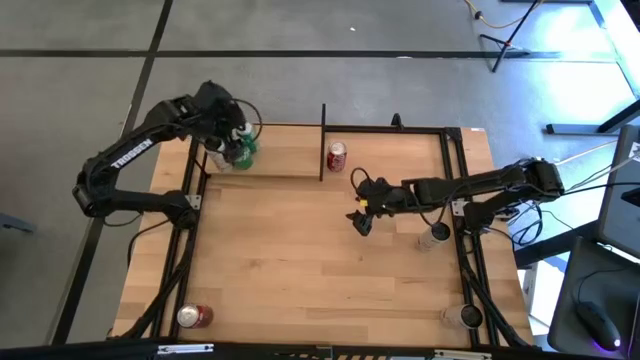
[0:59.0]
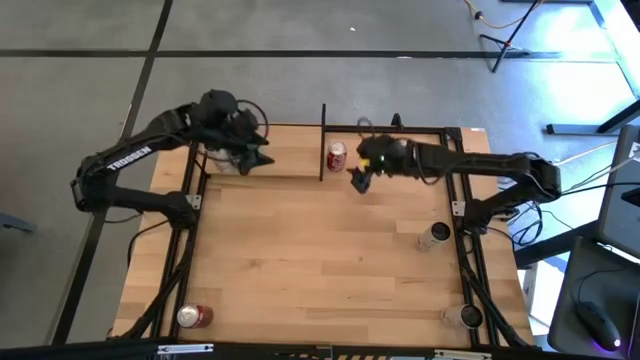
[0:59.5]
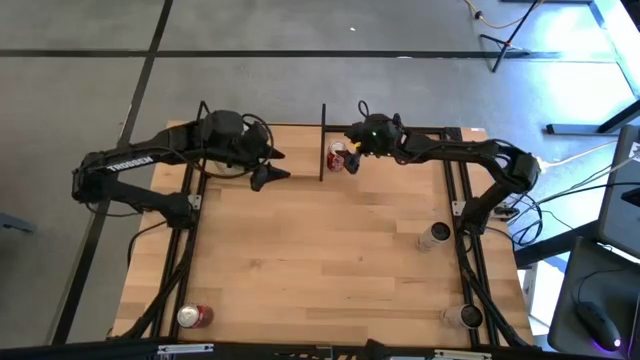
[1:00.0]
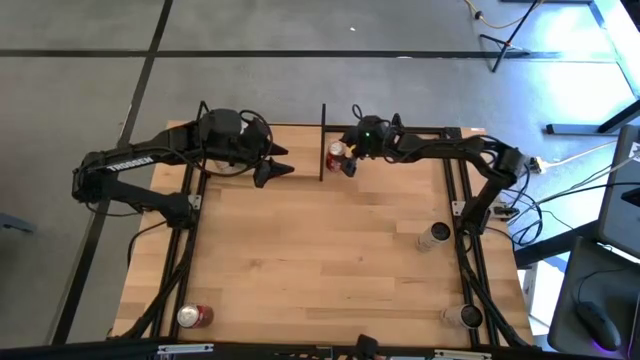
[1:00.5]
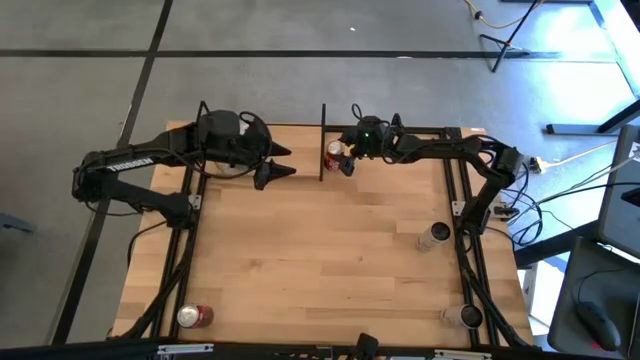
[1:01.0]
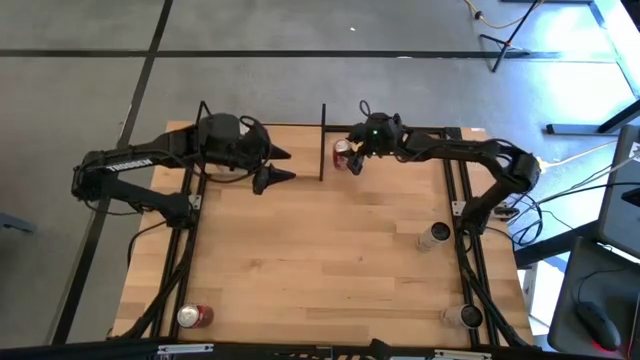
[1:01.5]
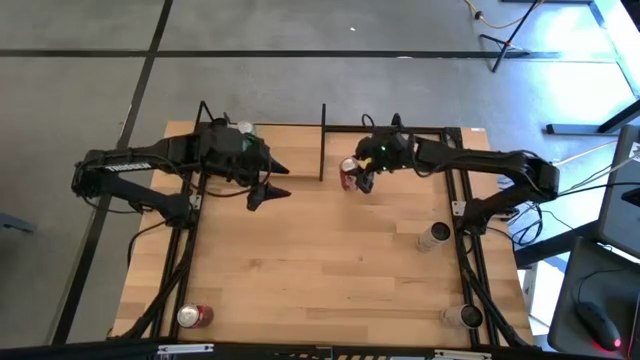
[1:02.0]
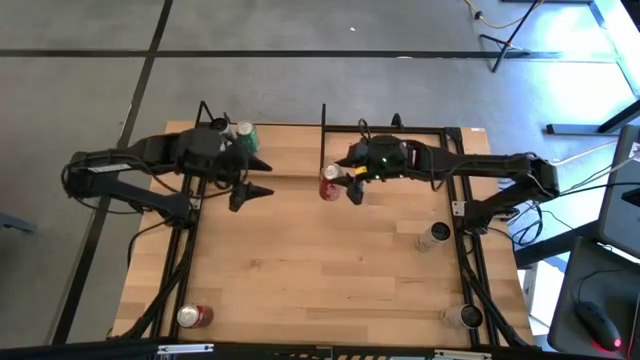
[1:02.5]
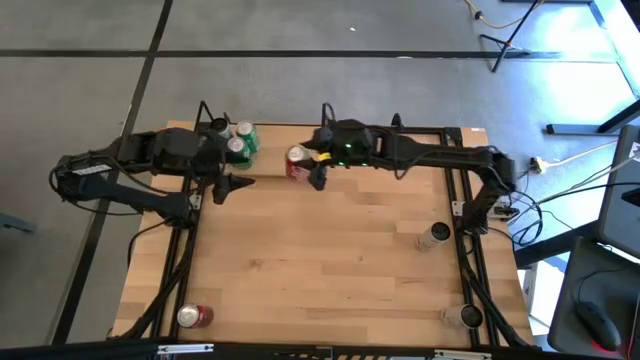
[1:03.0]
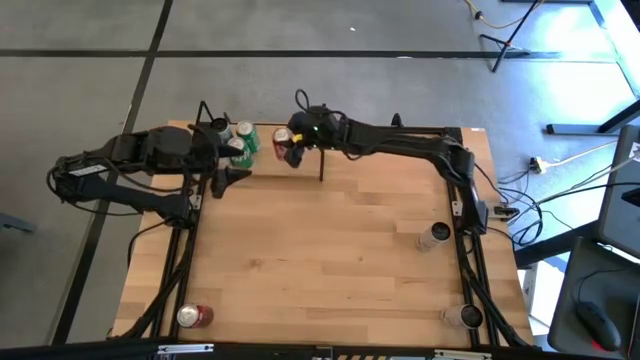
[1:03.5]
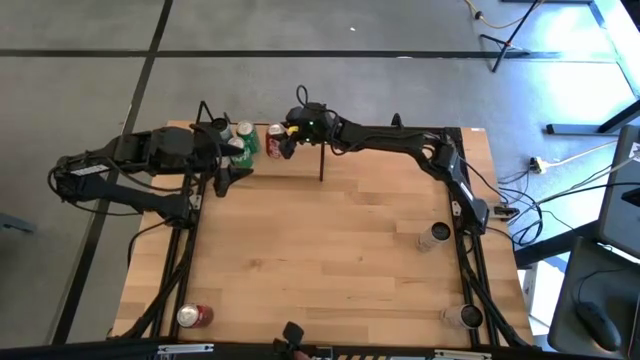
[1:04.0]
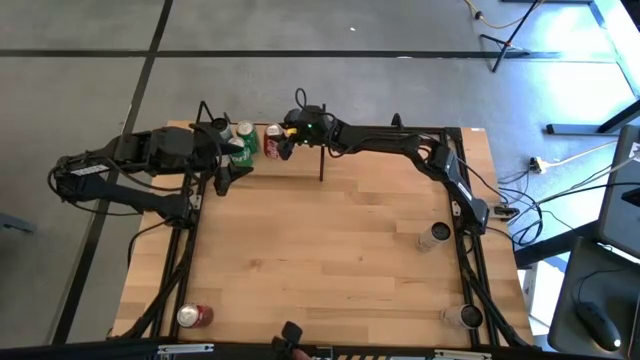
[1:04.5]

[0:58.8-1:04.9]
Task: Place canned beverage on shelf
Put the top red-white soda can on the shelf

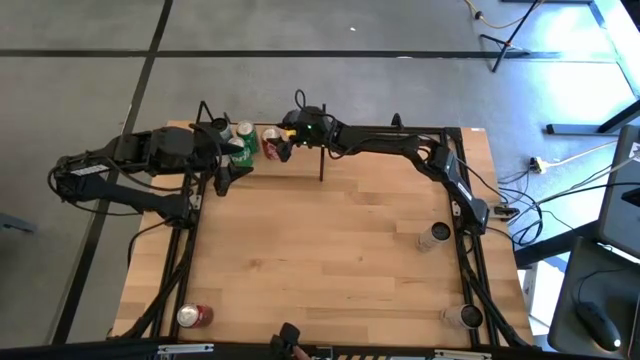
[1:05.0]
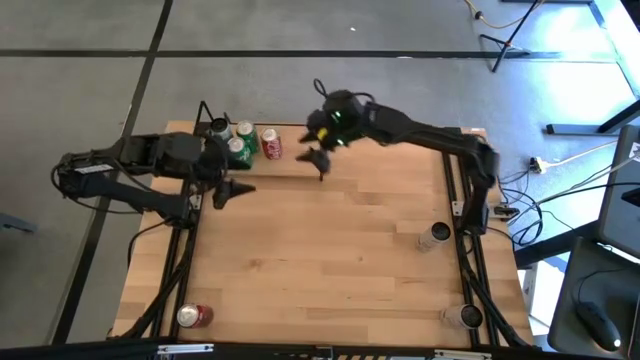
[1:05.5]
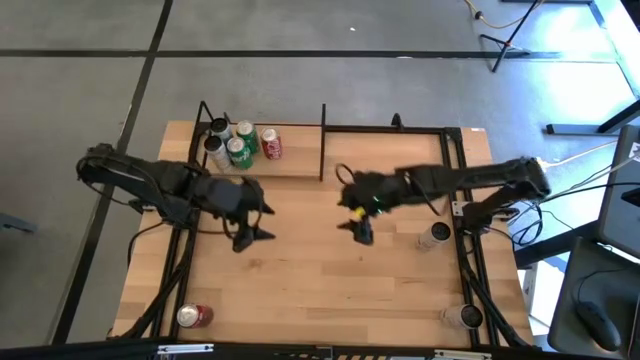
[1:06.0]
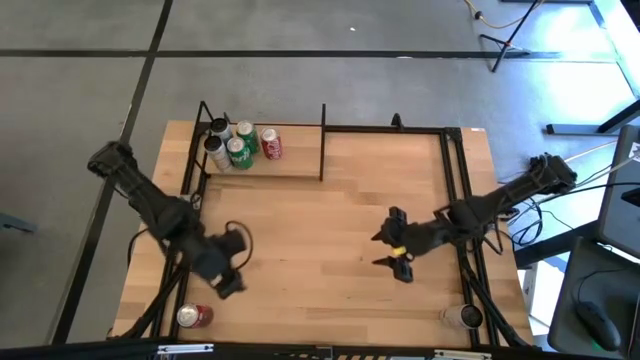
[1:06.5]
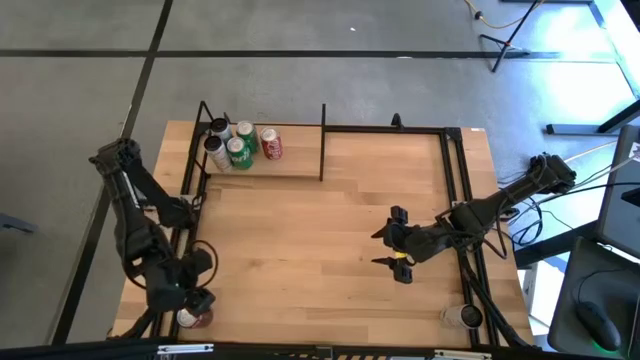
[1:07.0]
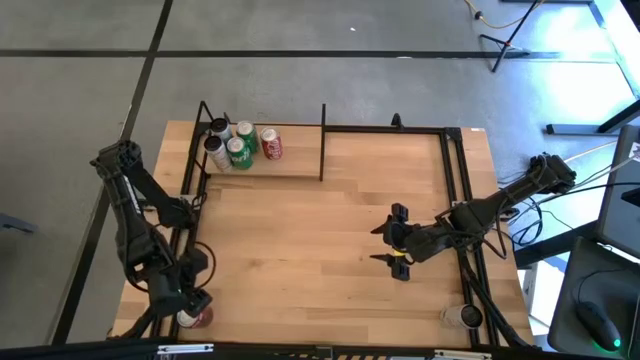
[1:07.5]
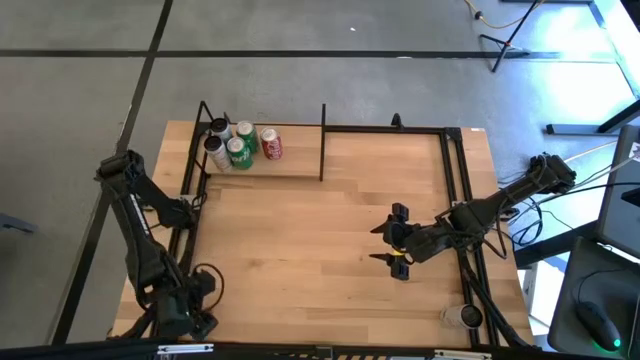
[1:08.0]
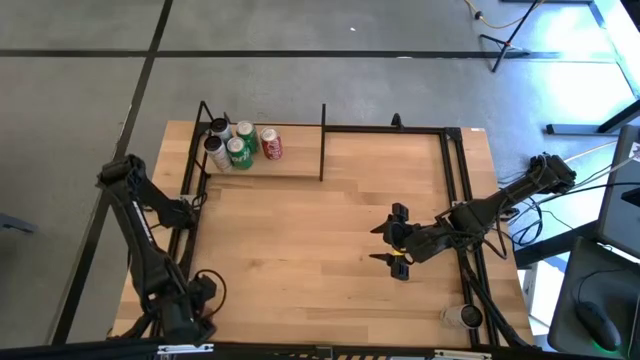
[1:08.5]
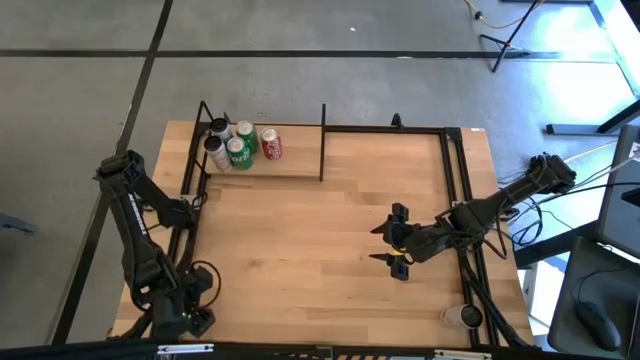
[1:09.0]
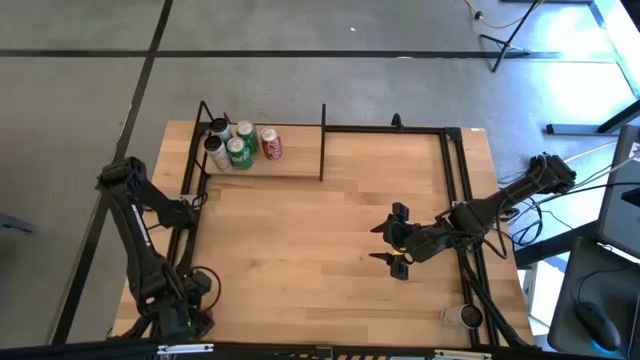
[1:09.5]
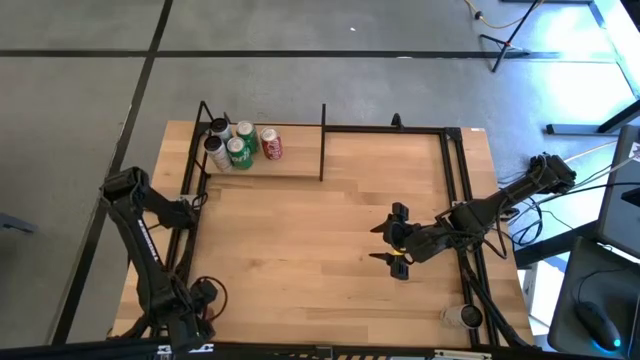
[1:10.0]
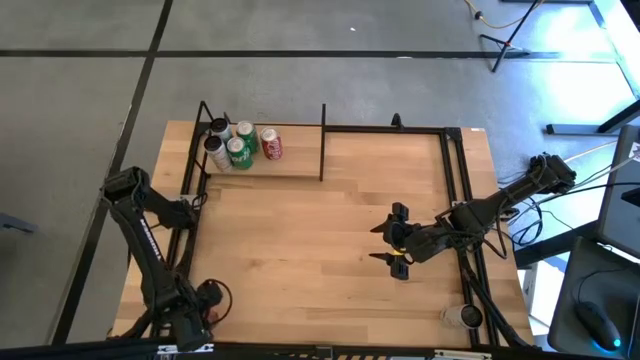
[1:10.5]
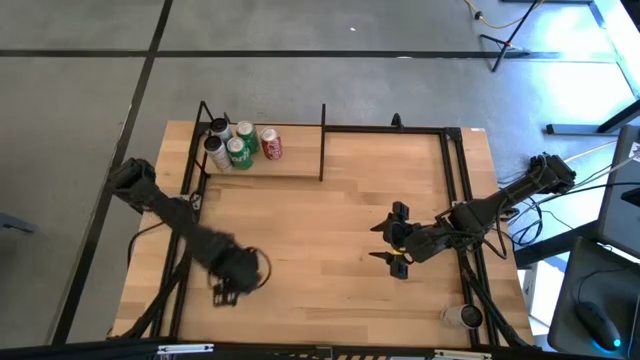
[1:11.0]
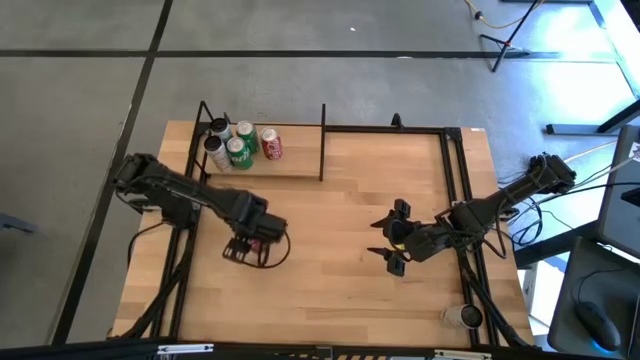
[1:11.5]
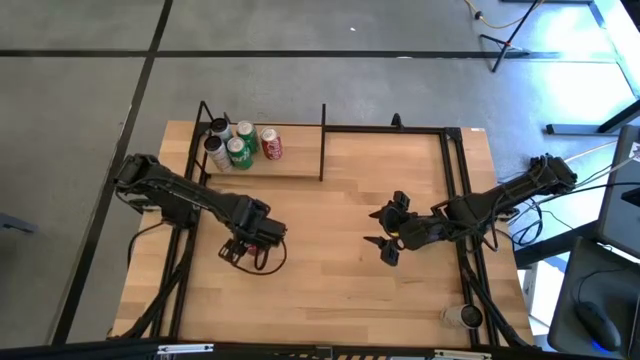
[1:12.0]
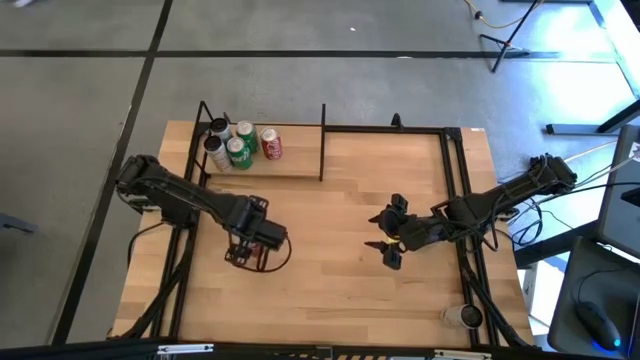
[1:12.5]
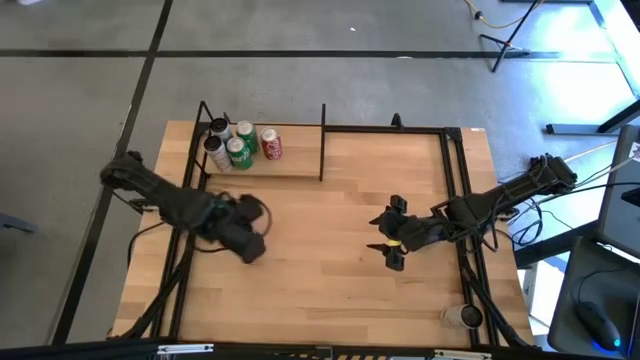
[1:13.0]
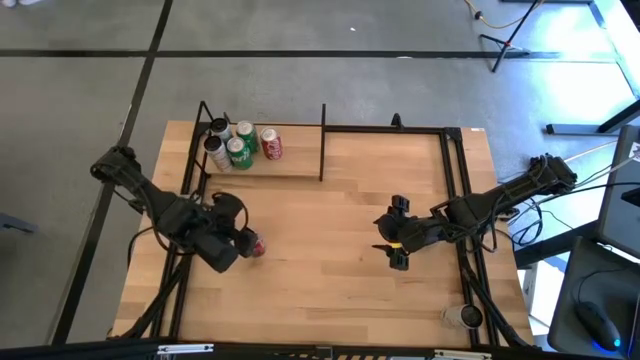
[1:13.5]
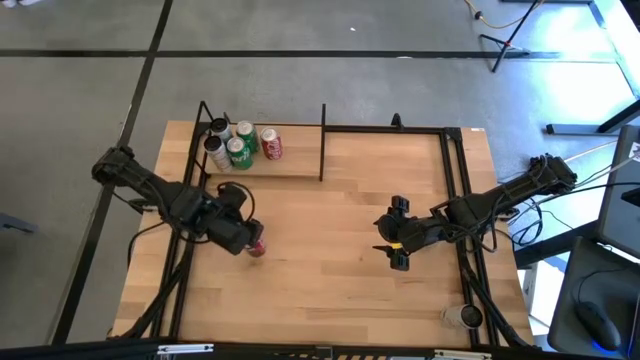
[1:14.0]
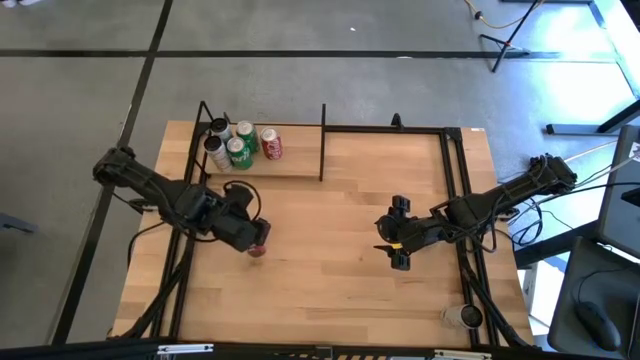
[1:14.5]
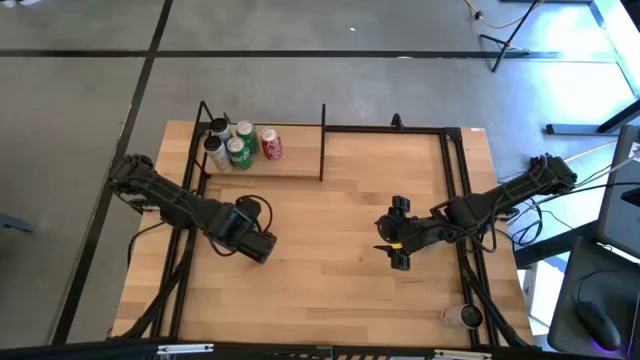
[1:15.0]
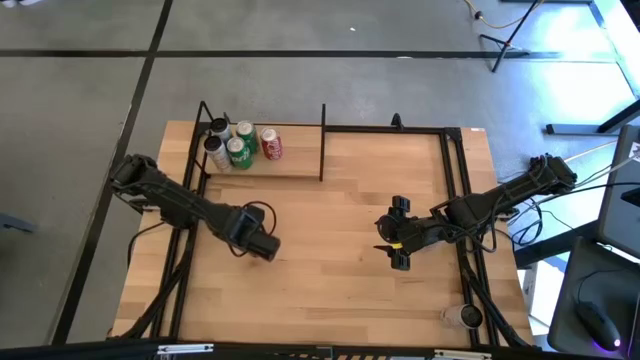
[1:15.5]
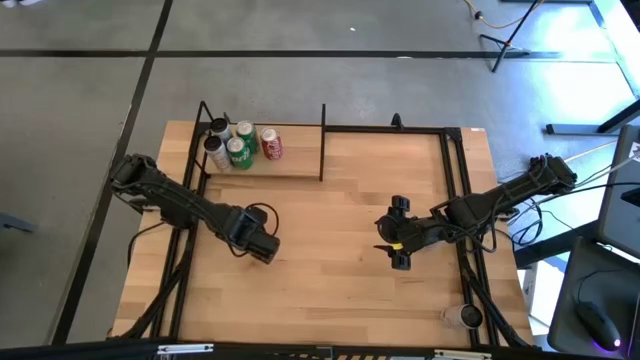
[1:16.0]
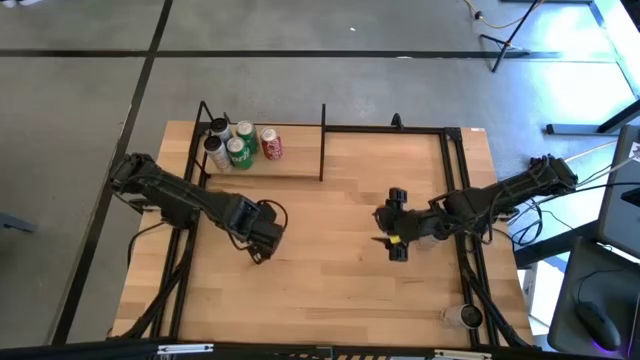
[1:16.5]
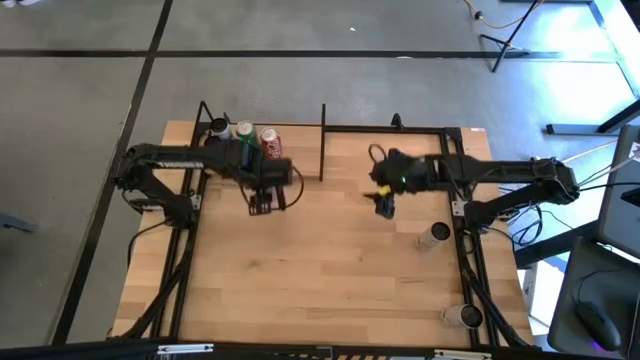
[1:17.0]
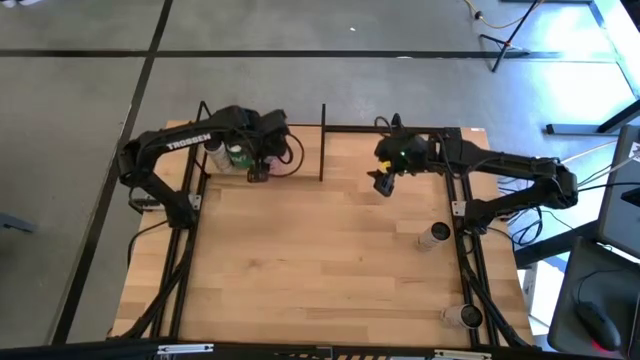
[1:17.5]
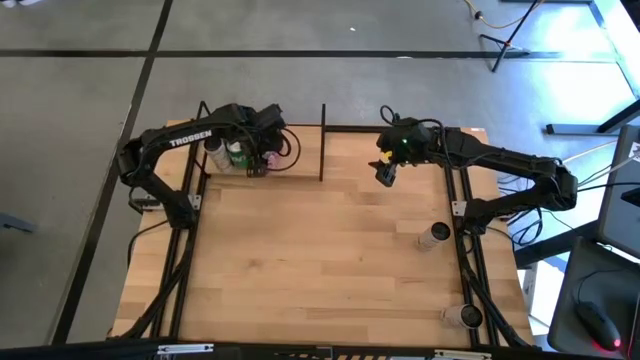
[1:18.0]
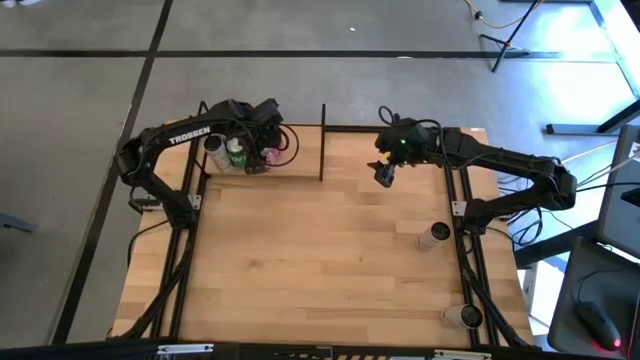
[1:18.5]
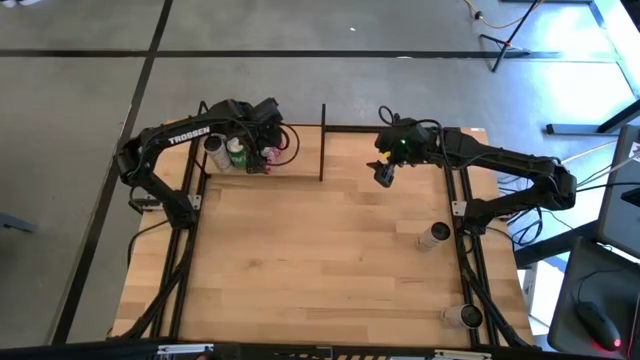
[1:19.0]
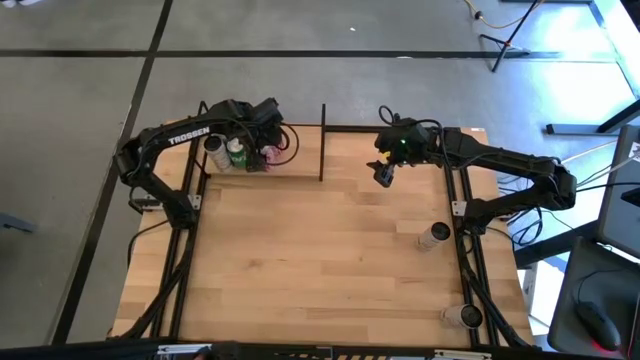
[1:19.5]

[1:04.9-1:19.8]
Put the red-white soda can on the shelf
